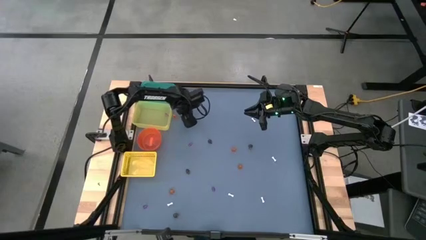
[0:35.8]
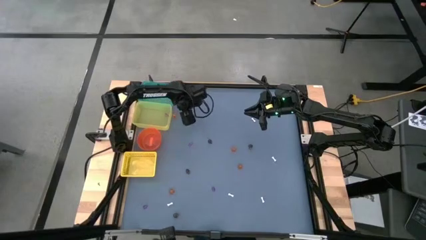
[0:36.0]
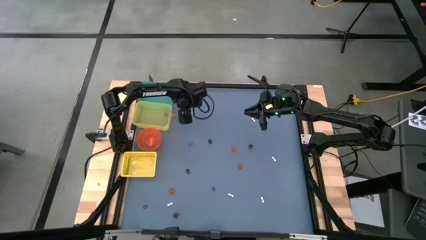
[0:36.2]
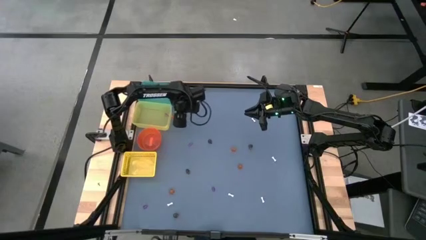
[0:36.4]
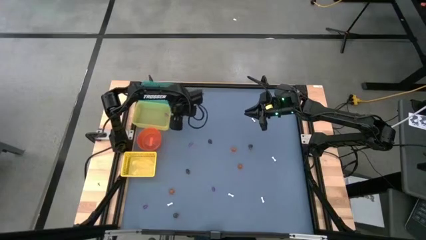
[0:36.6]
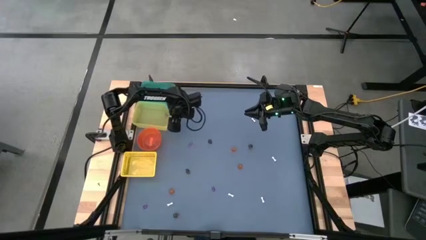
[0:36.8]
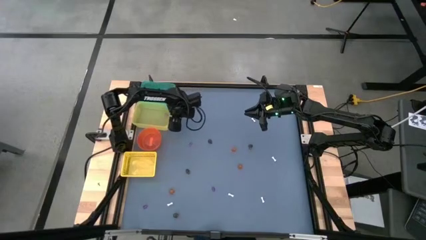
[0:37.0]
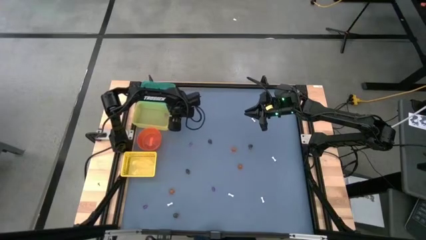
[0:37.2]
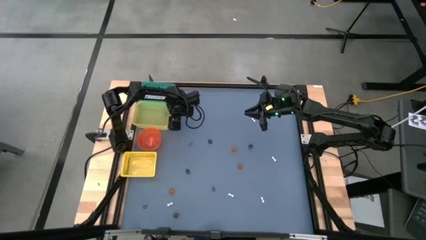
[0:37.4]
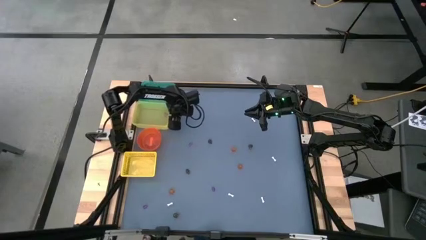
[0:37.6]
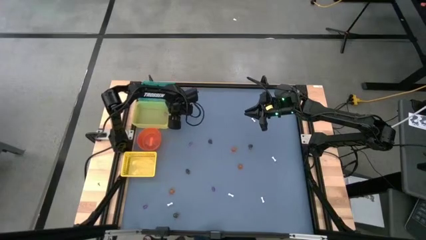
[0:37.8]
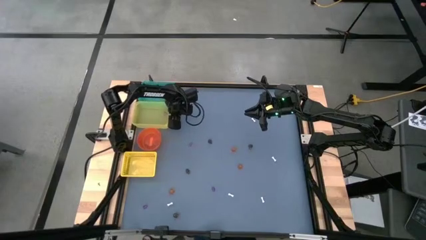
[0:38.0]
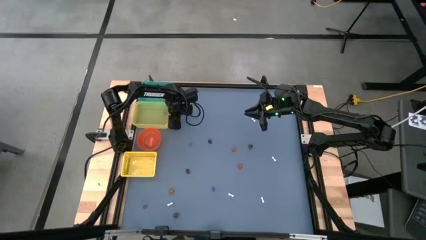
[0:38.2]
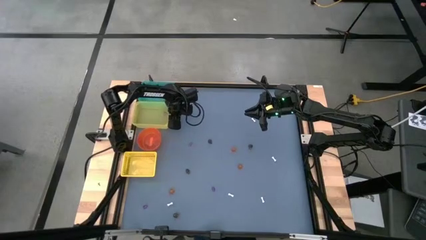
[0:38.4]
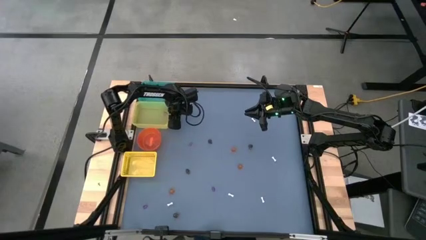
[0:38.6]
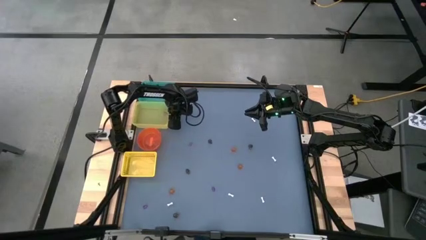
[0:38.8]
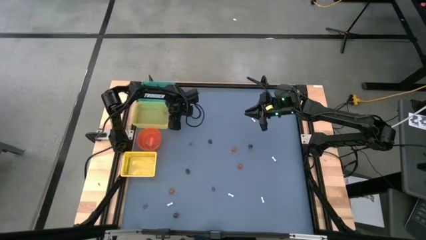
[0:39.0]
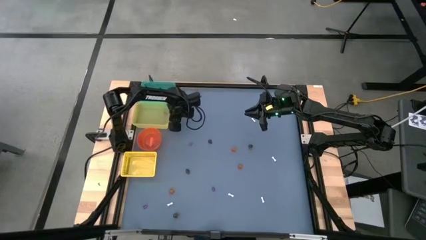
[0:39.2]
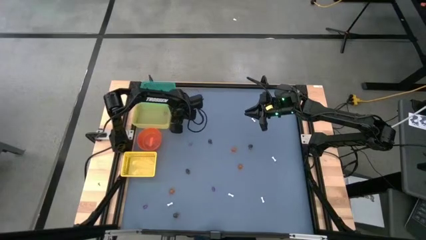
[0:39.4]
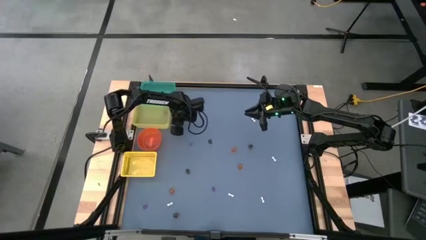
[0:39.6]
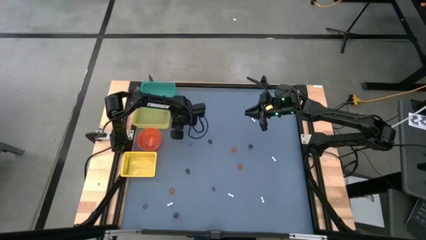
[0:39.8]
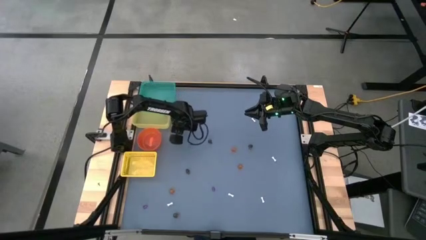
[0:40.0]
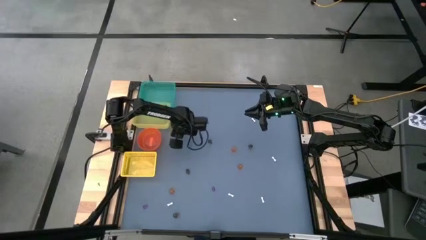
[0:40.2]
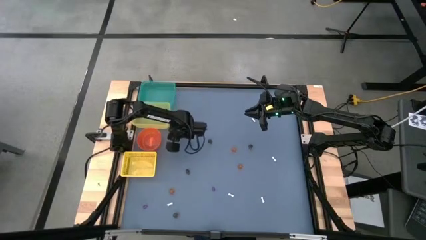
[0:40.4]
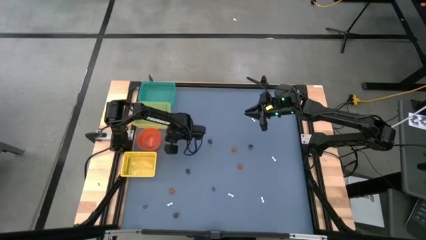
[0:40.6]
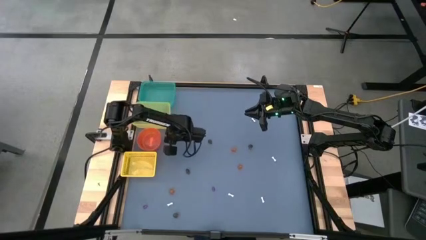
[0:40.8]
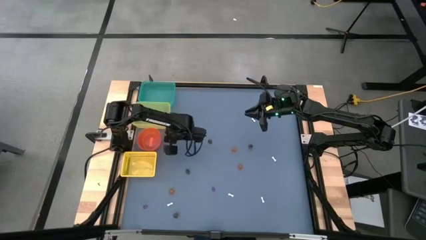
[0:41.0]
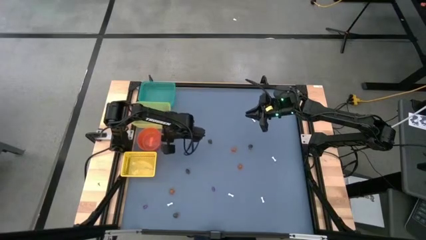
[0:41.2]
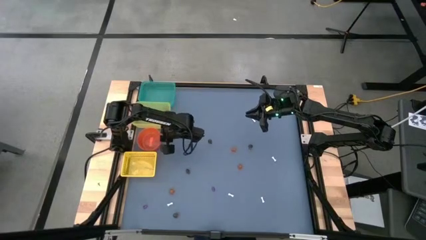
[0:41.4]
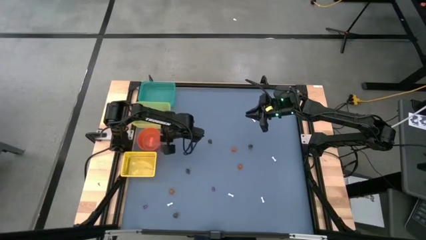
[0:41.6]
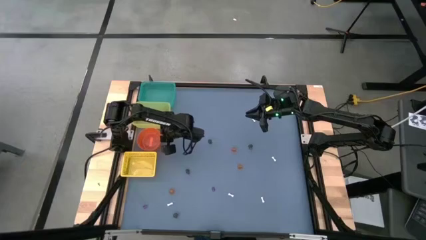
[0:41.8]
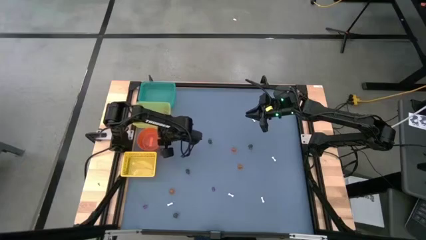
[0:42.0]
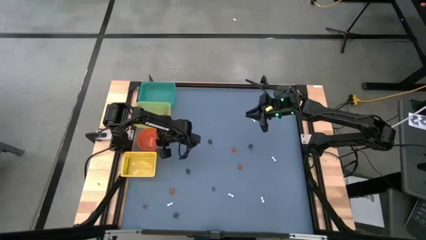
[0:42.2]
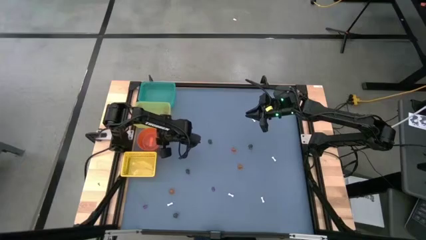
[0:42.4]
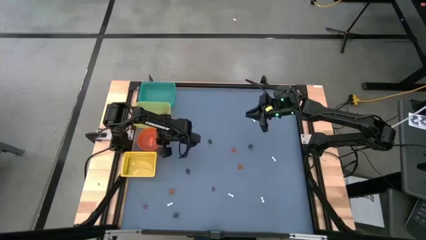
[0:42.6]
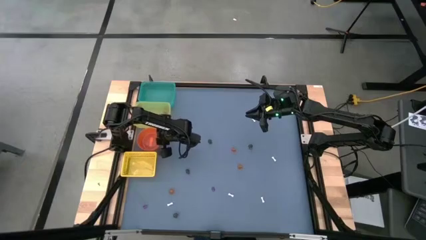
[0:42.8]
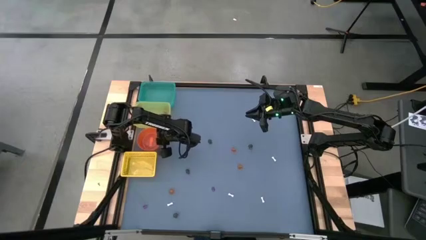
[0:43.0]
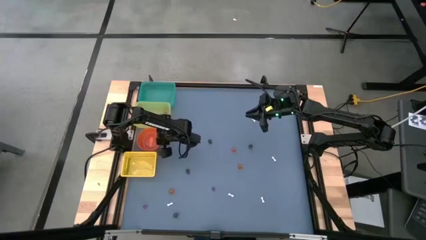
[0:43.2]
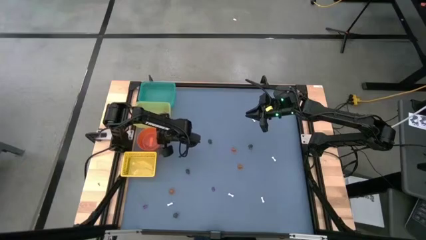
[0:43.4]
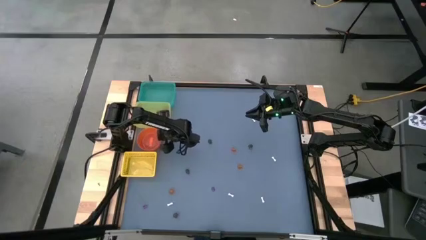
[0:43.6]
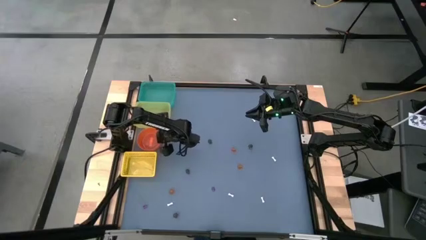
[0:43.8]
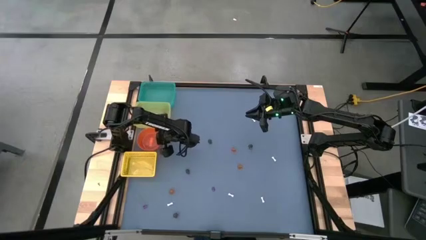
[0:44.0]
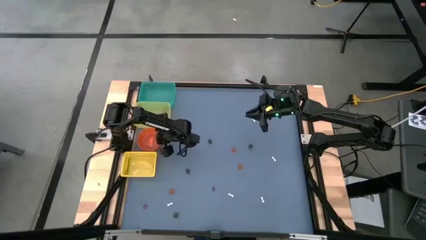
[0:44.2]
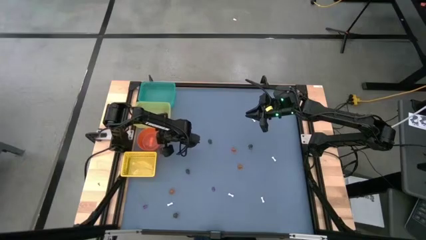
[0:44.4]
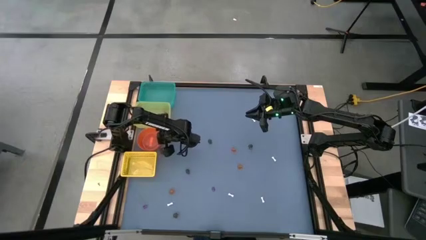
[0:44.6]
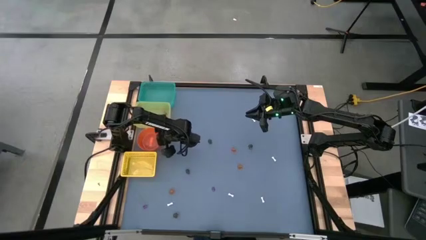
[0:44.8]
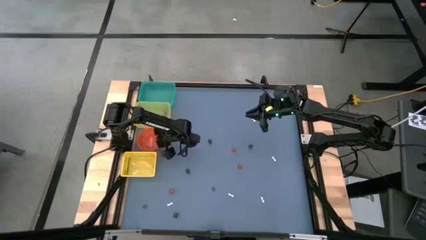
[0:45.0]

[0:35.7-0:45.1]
Task: Sort Halloween decoration
Put the top left orange pumpkin toy into the orange bin

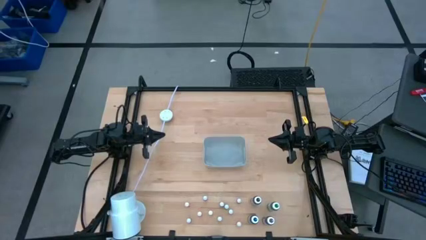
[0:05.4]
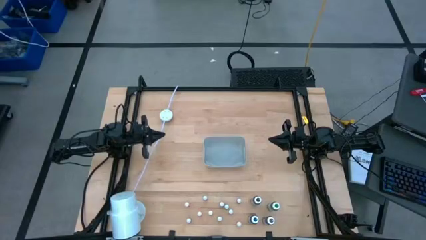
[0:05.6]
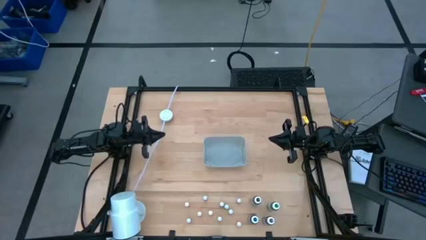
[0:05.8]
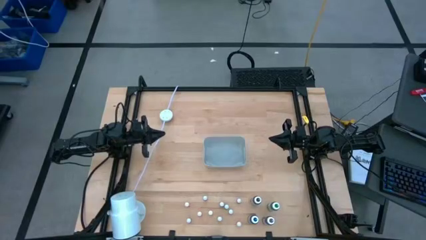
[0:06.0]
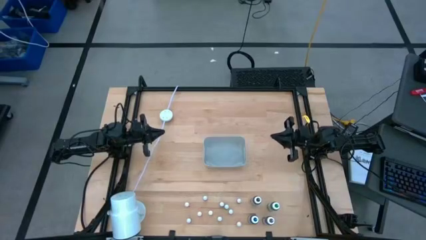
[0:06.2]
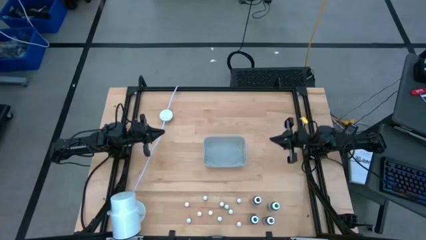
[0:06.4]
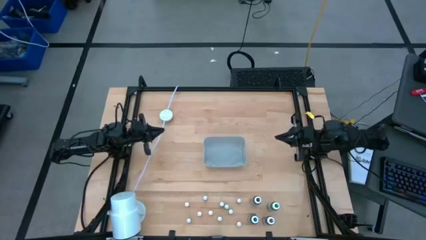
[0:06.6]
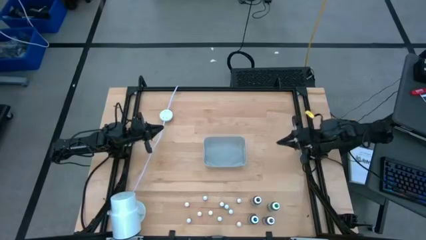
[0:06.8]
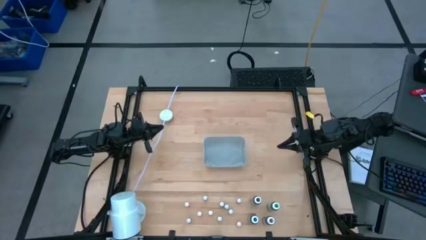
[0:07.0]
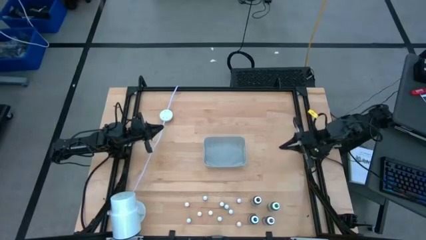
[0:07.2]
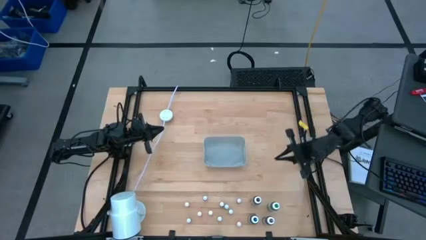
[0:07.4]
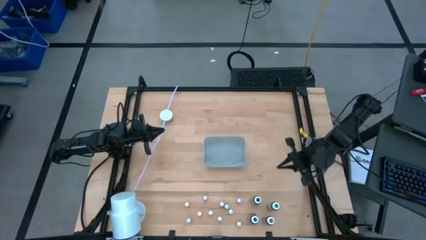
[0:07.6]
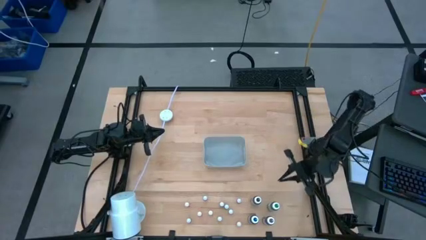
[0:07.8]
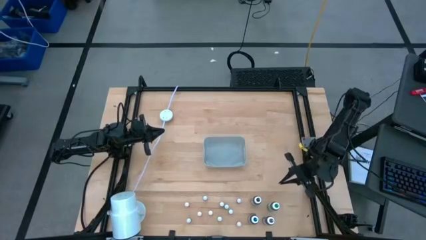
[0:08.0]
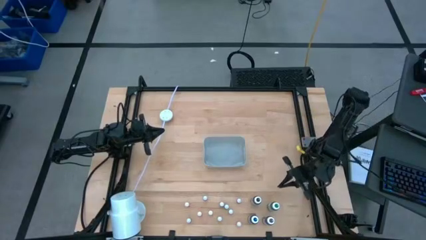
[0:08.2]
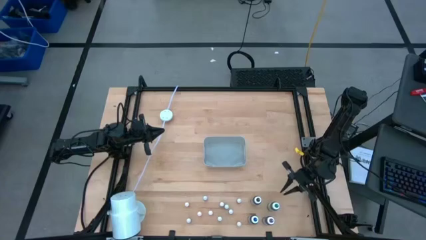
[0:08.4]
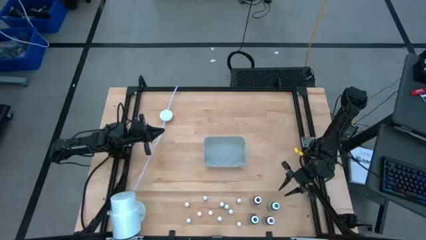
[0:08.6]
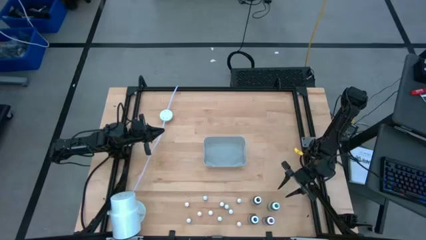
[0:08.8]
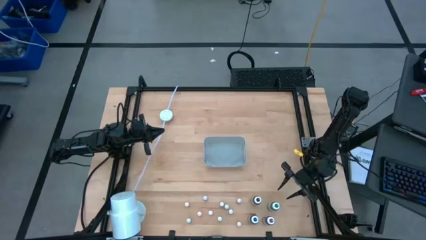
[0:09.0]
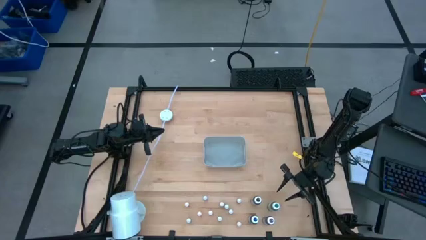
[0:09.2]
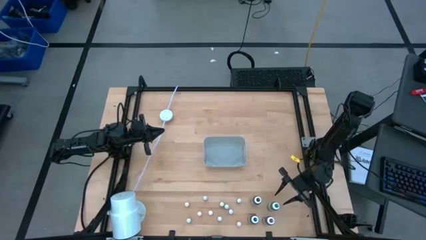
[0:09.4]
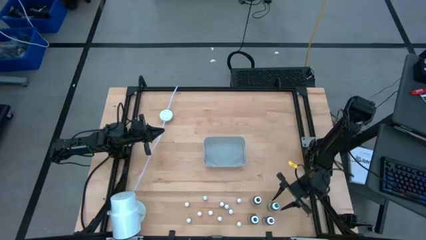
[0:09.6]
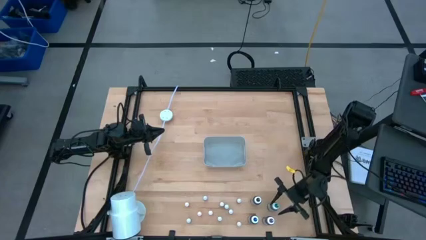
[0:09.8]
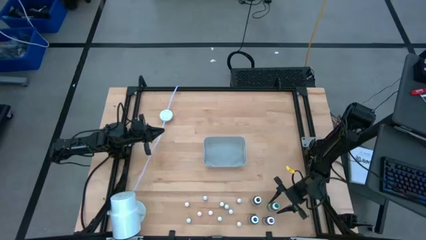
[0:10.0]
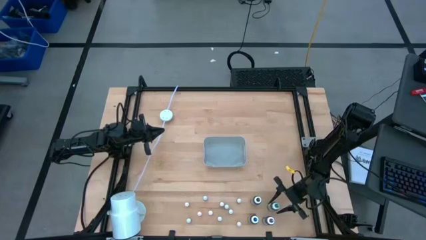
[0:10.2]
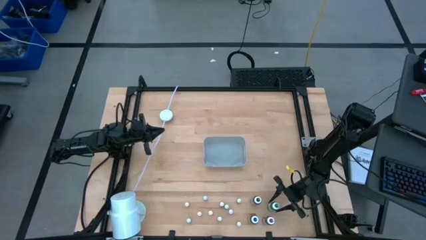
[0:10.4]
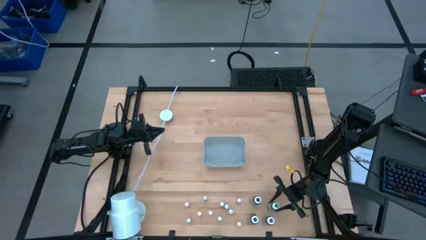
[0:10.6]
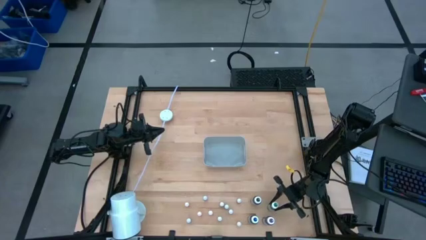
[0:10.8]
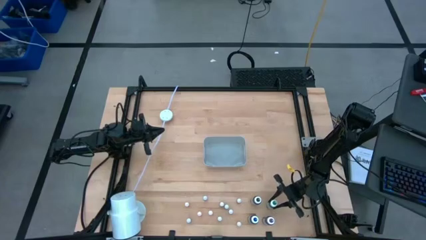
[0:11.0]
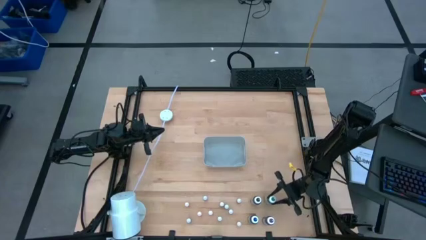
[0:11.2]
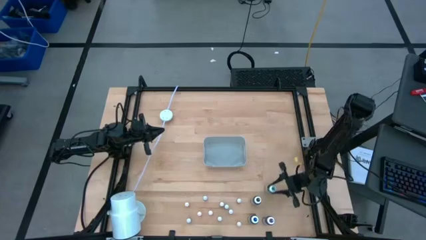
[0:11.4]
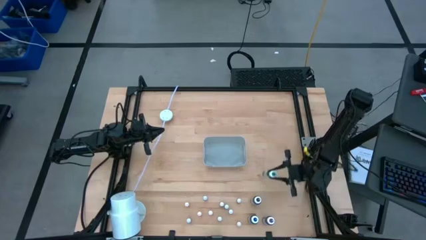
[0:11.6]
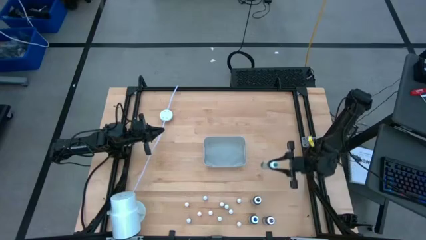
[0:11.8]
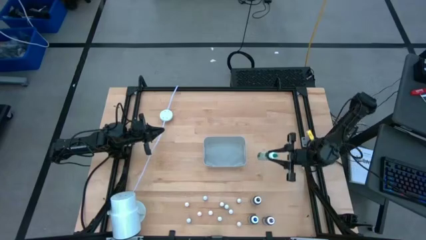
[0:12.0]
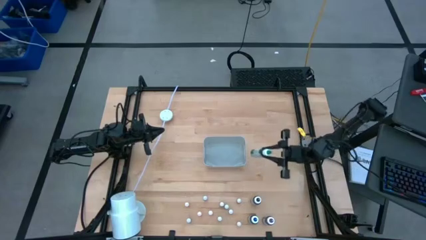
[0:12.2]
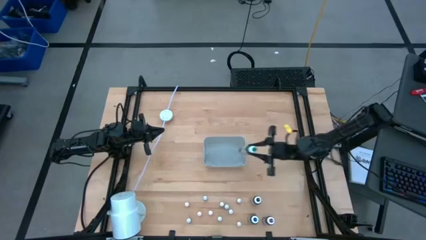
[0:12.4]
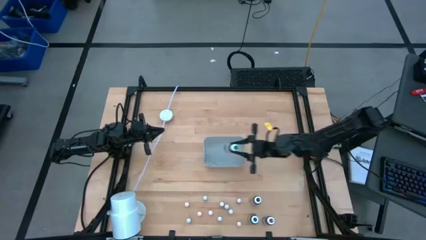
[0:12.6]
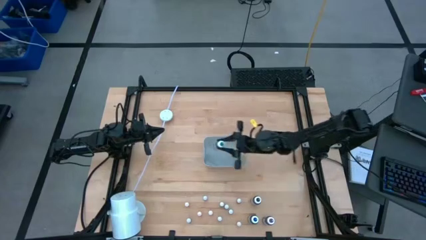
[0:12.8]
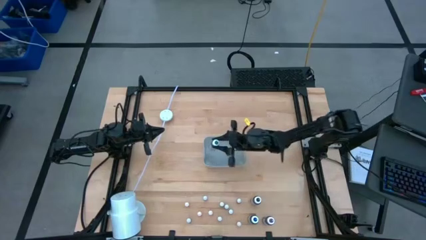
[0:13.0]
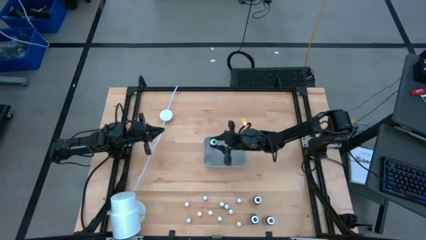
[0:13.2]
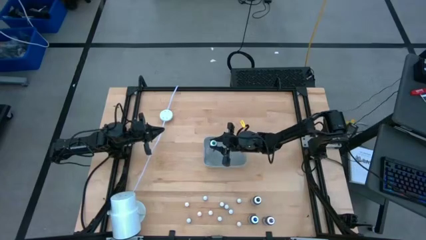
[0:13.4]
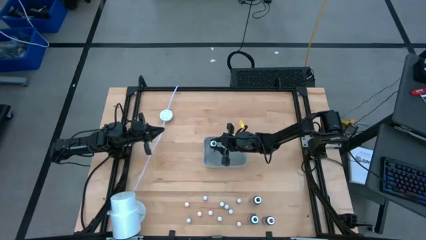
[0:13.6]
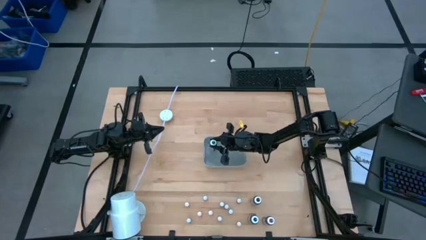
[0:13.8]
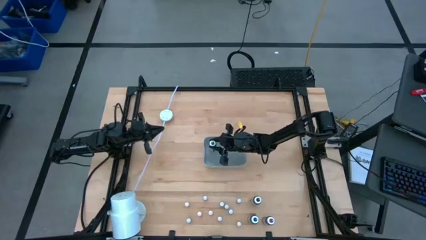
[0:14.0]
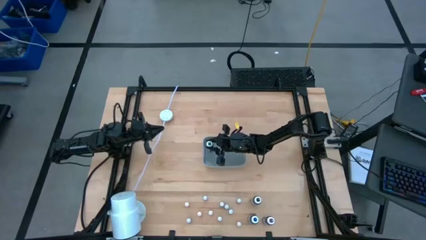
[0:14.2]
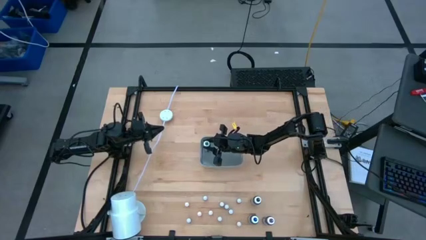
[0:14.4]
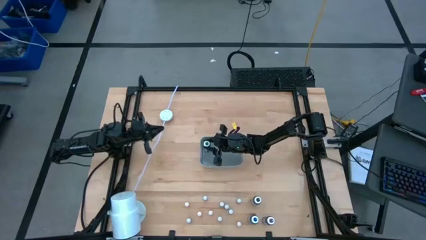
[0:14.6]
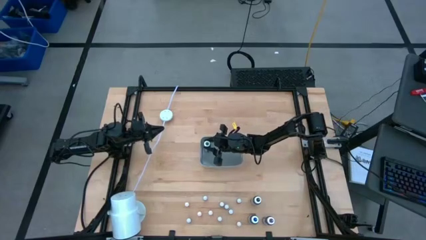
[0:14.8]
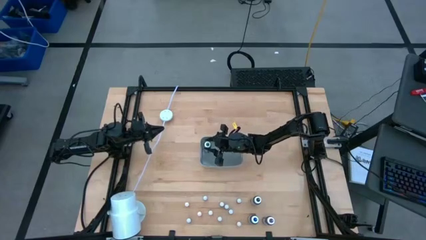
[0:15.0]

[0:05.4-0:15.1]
Task: Pick & Place food coloring
Put the large green food coloring bottle into the gray container
